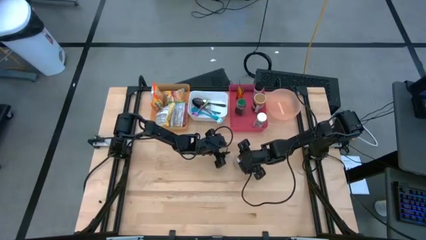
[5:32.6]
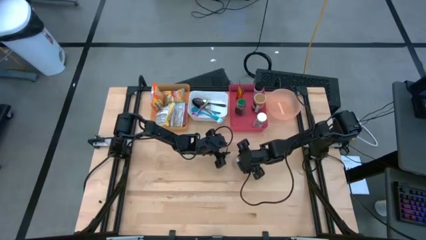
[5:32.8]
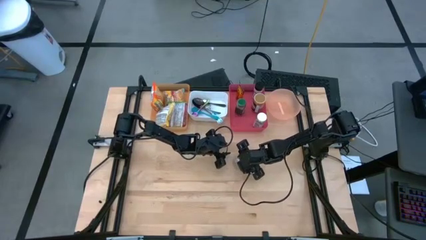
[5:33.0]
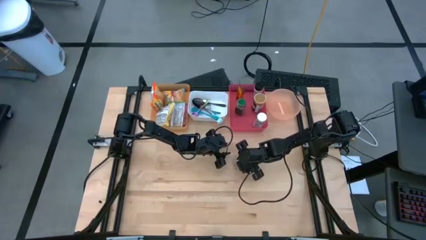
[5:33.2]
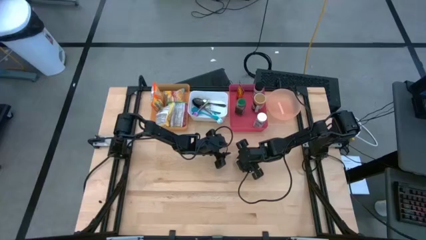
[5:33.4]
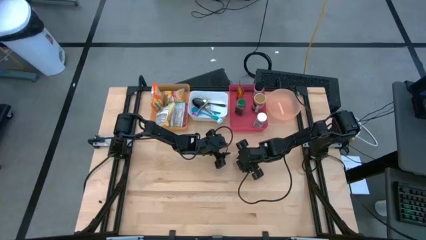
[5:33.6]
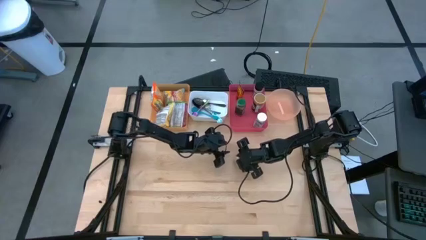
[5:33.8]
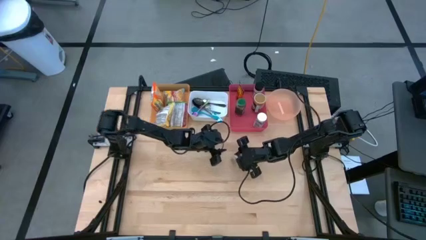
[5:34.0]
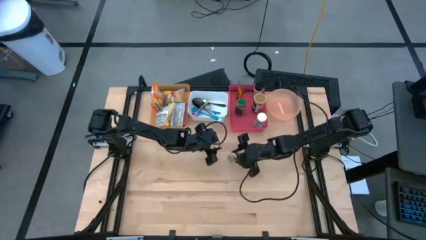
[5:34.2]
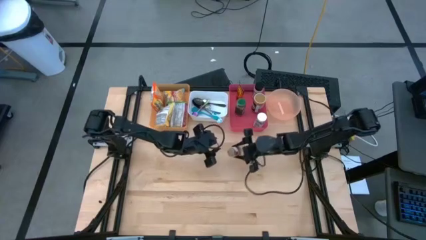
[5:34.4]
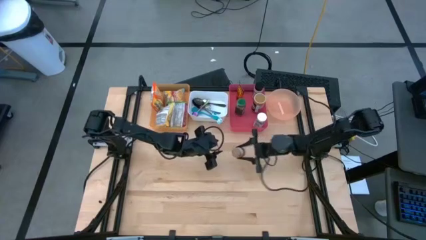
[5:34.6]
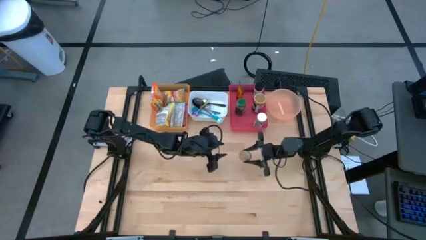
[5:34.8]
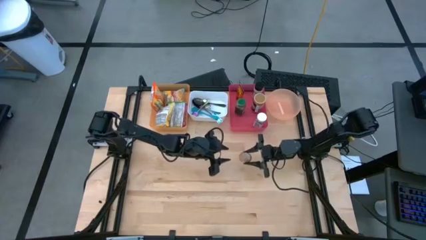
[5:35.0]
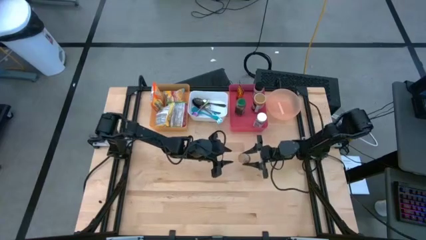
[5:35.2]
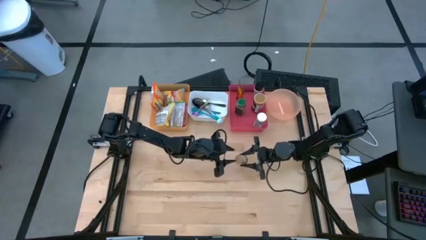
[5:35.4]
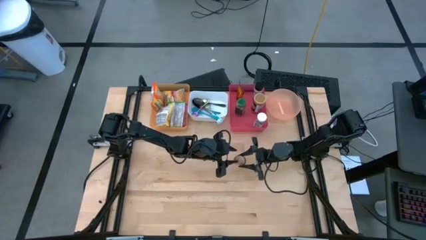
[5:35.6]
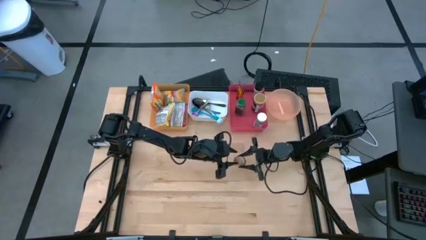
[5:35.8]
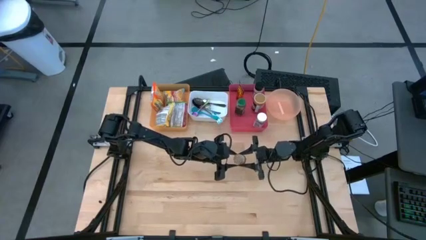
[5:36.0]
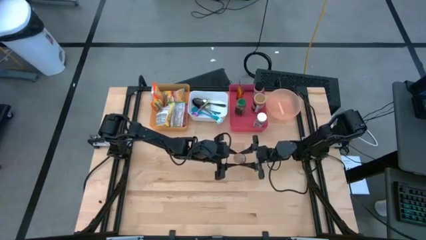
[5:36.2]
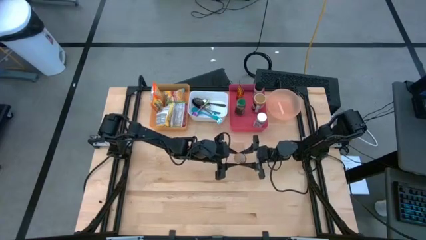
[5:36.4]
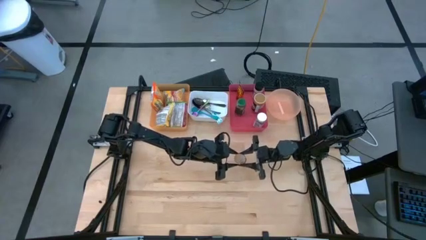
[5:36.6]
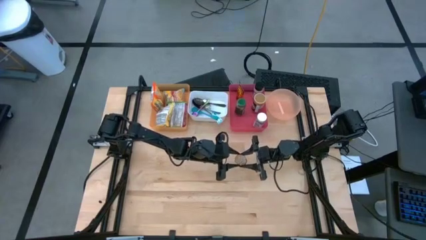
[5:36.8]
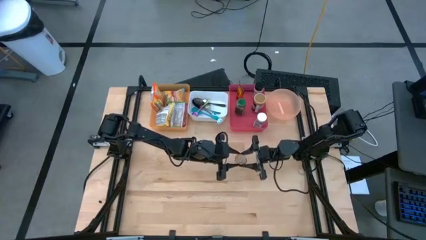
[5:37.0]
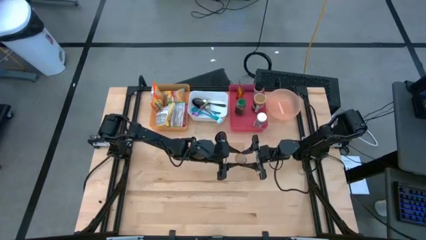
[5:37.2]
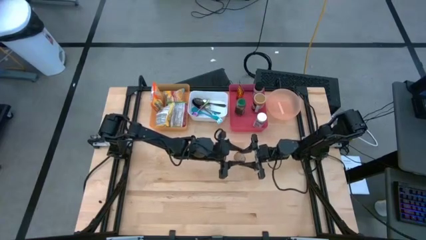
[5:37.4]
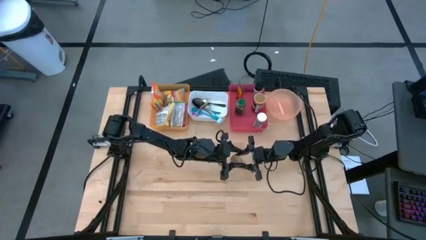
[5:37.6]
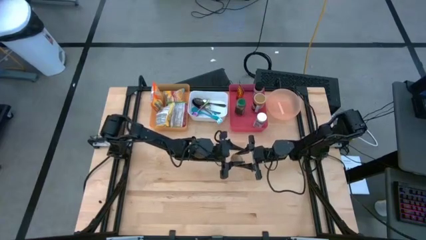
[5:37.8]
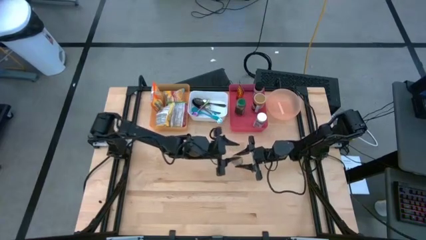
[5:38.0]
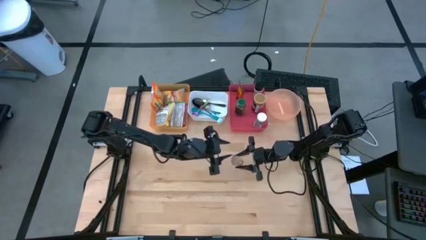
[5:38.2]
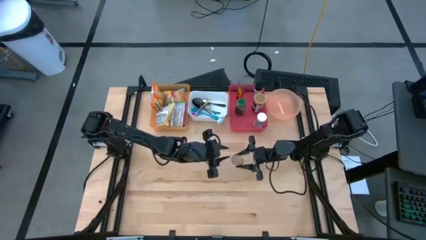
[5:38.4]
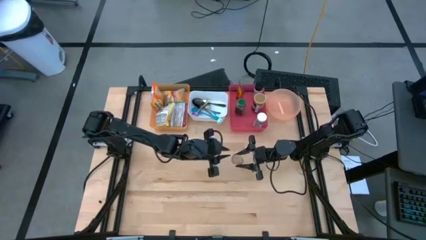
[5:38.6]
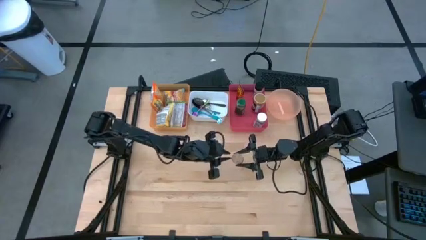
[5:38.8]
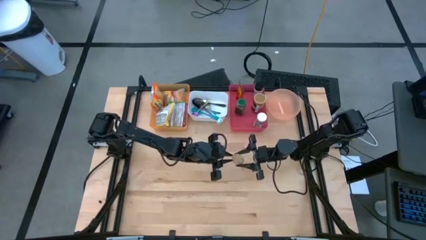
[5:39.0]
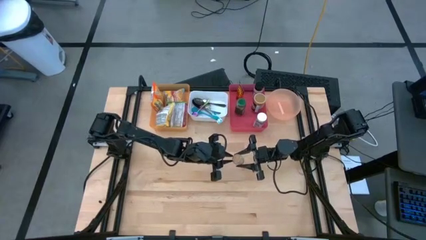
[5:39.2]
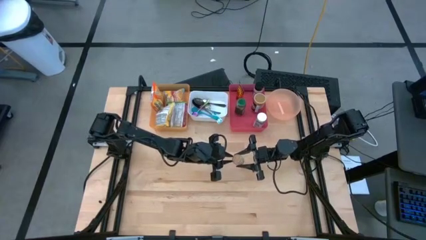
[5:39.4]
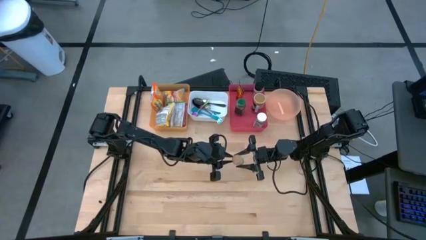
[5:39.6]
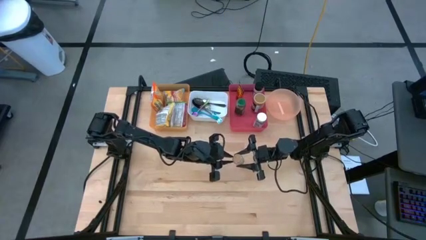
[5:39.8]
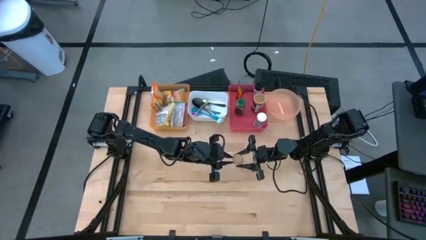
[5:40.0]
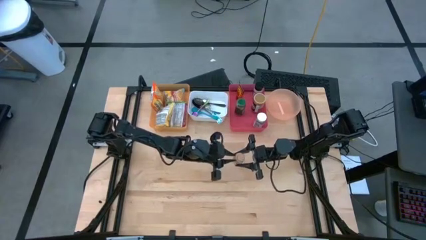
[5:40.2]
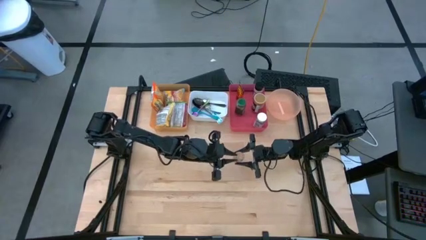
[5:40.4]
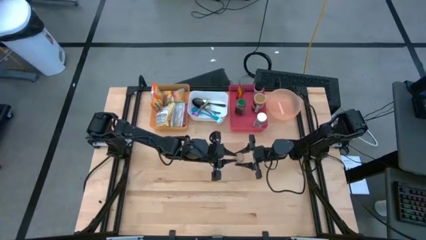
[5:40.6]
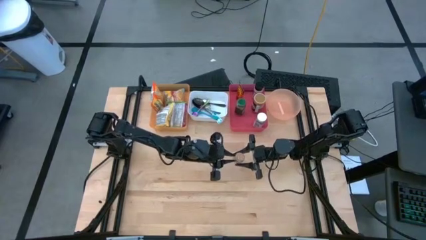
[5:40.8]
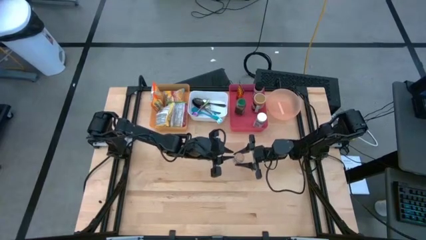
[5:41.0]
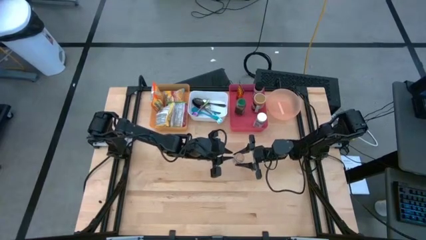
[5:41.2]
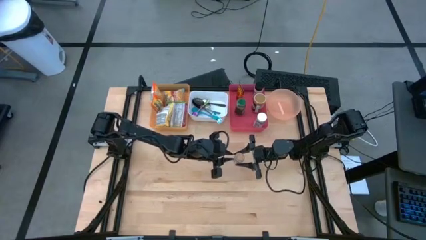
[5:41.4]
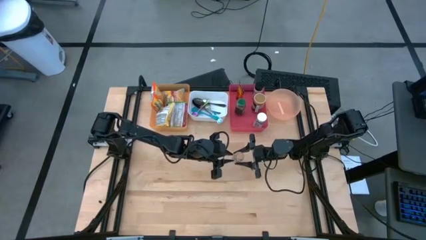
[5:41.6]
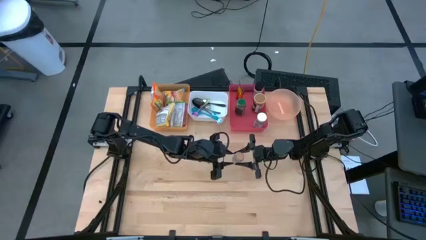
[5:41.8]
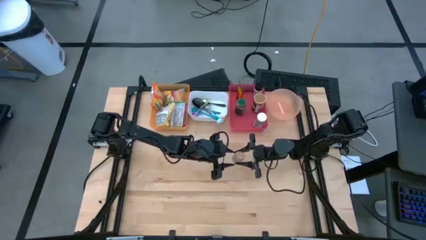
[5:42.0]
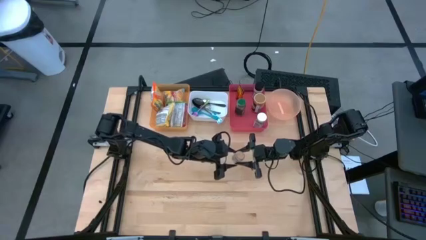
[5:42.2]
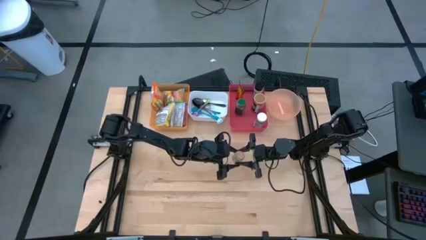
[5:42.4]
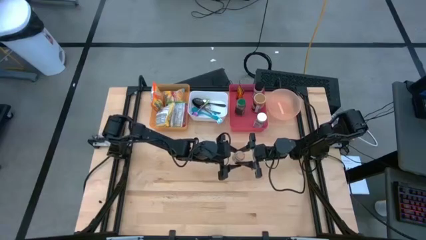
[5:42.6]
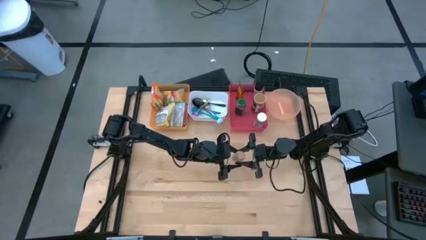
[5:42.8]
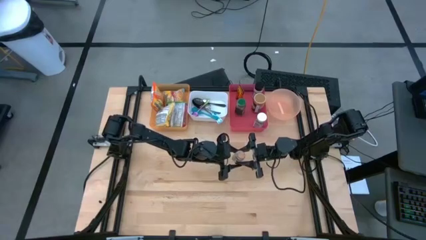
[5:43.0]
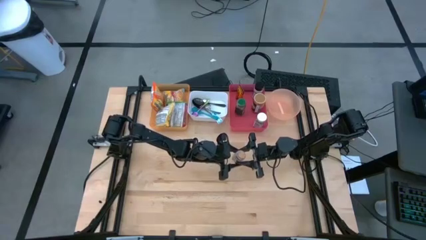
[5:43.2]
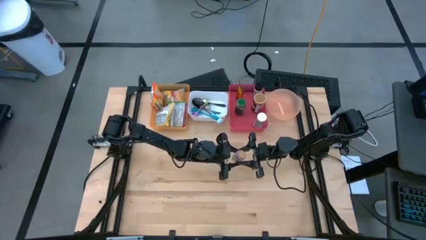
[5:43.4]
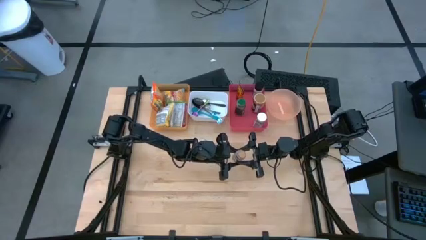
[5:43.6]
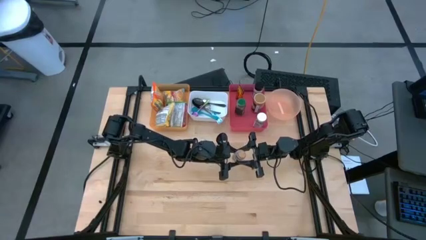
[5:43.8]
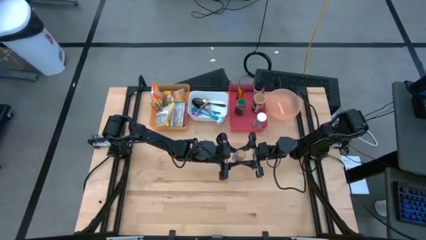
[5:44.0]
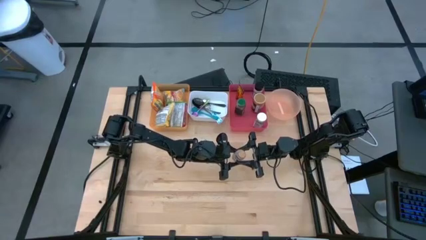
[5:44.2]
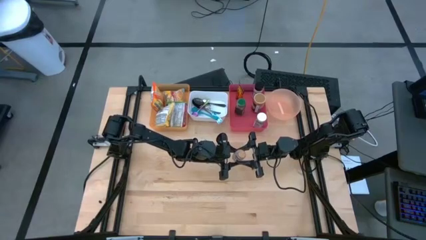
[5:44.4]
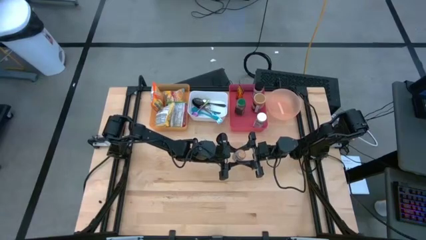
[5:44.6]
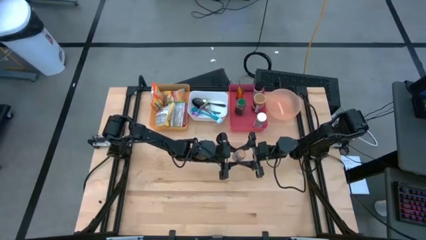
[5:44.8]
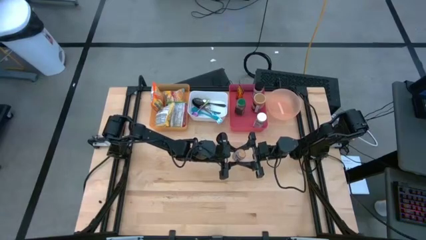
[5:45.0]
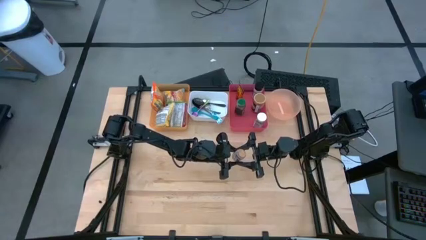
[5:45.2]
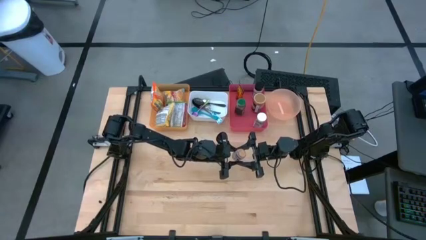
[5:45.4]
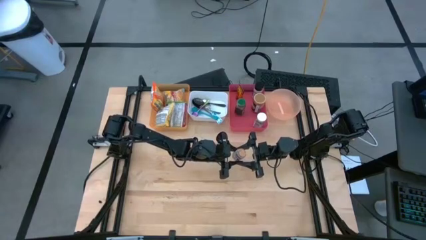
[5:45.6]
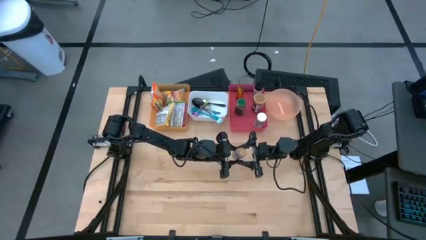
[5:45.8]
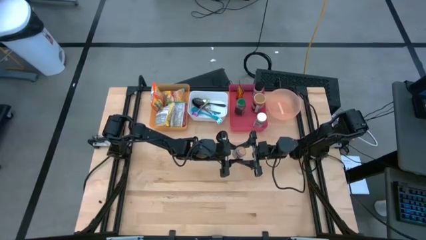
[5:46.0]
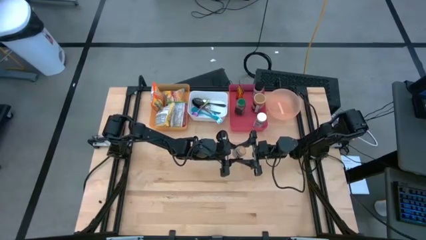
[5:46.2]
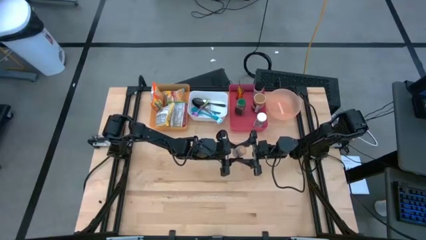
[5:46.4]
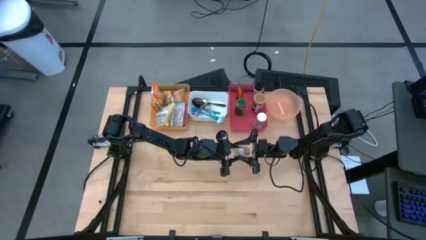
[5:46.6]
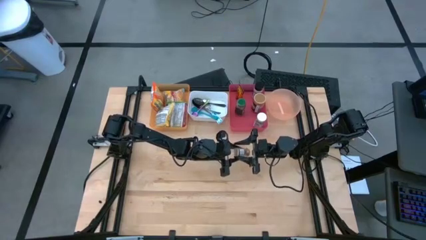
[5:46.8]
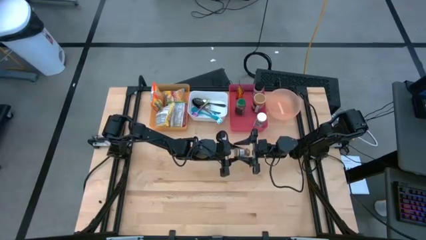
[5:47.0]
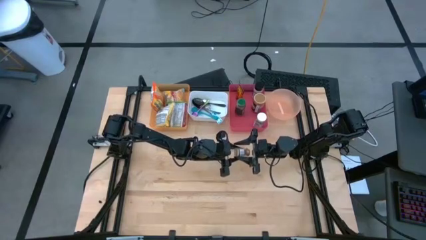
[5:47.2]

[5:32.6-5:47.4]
Task: Pick & Place Food Item
Put the brown seasoning bottle into the red bin
